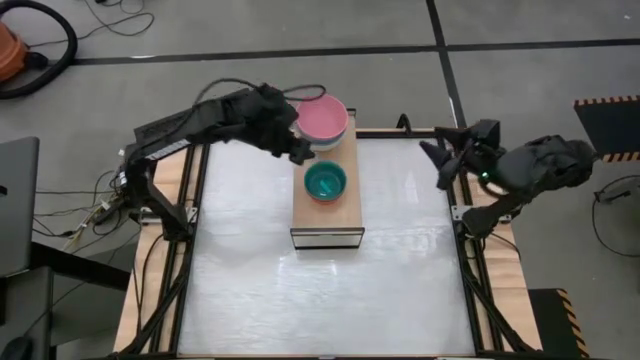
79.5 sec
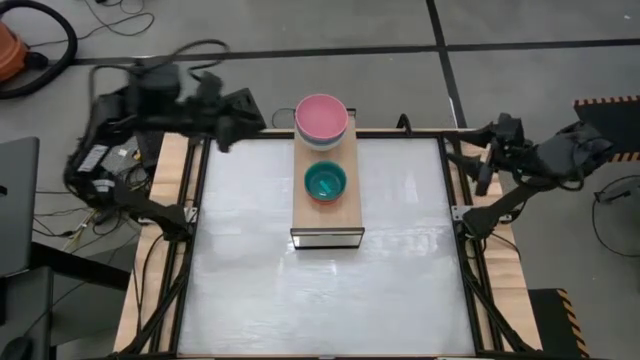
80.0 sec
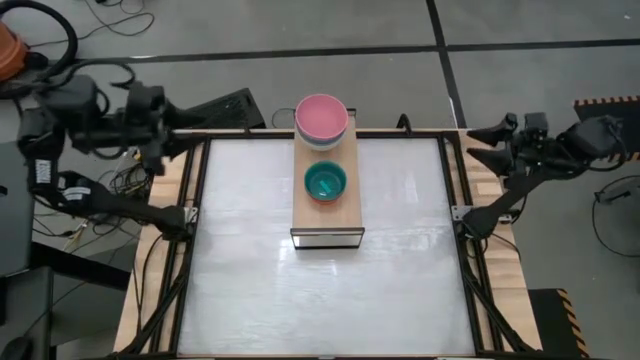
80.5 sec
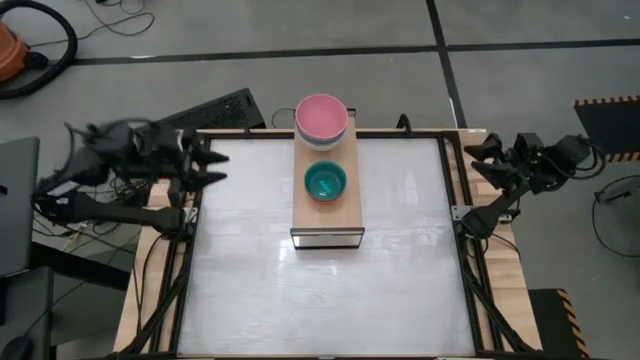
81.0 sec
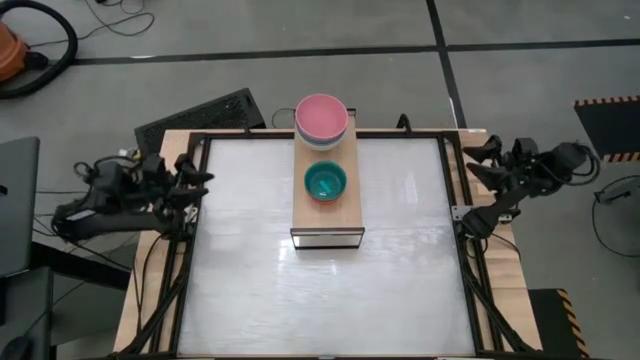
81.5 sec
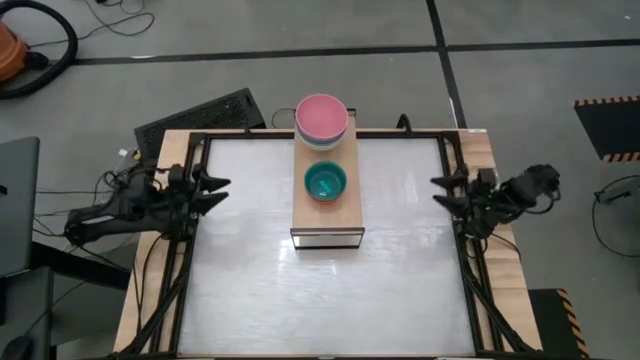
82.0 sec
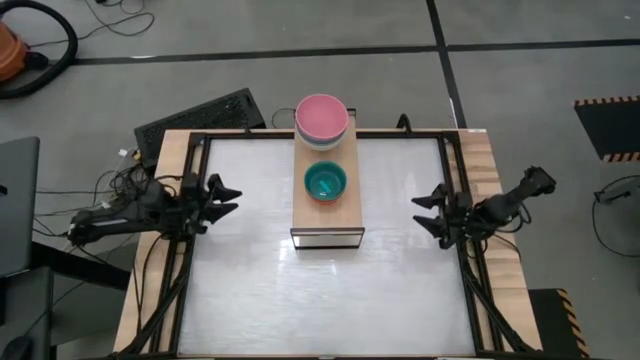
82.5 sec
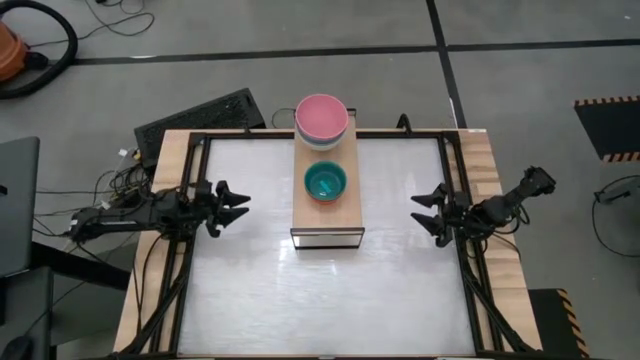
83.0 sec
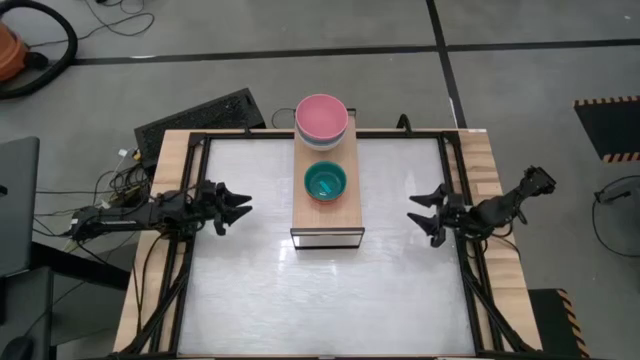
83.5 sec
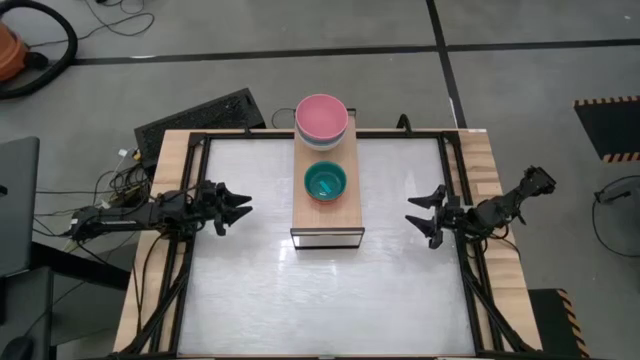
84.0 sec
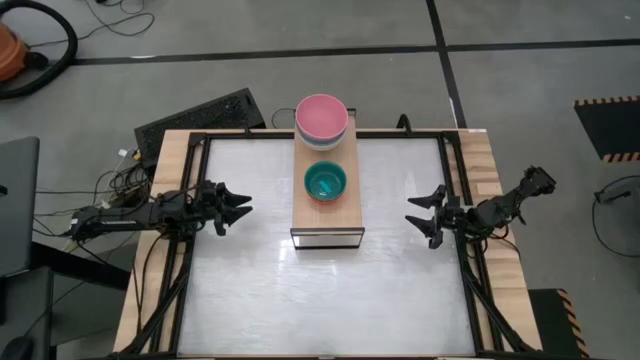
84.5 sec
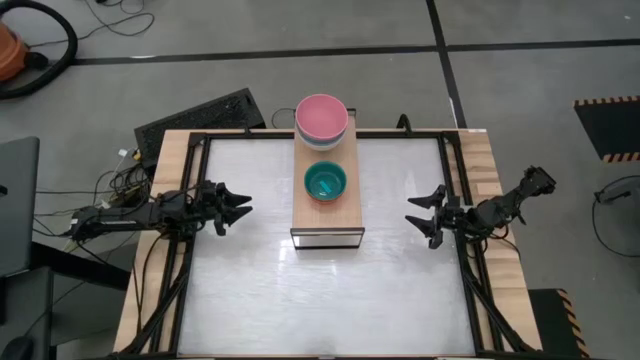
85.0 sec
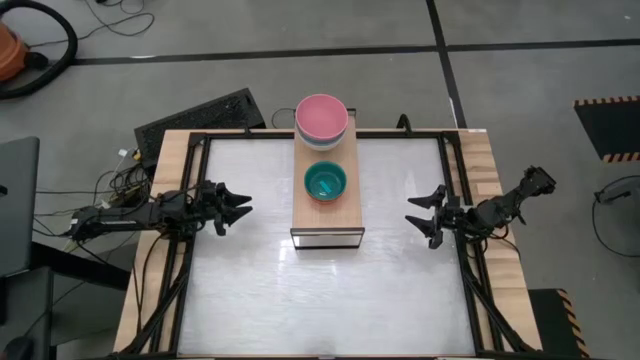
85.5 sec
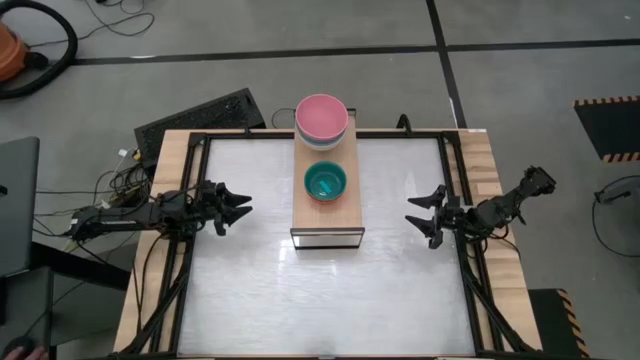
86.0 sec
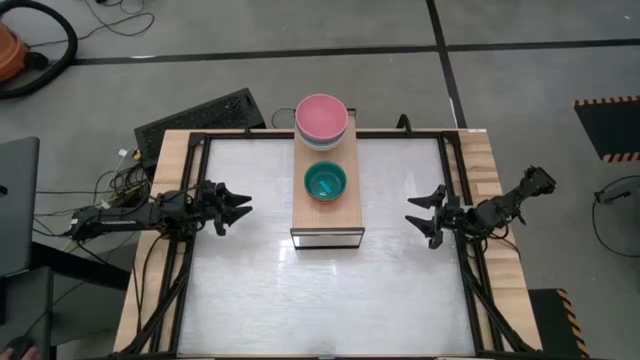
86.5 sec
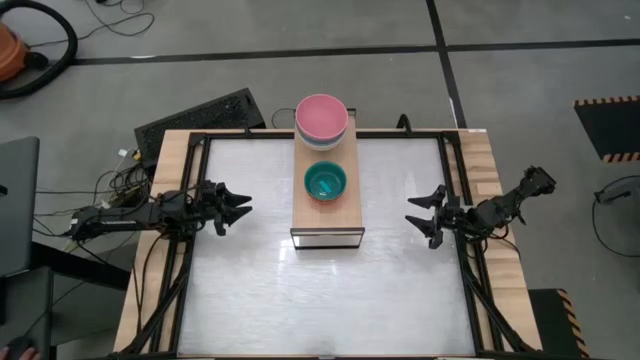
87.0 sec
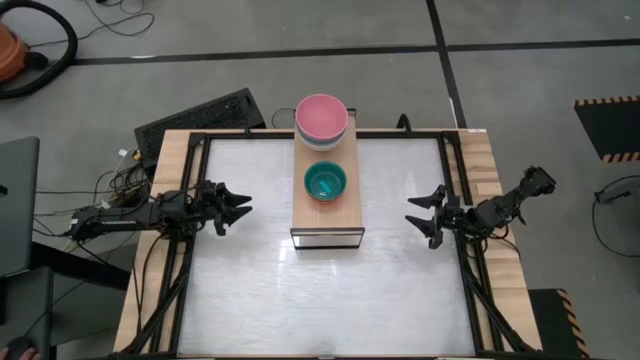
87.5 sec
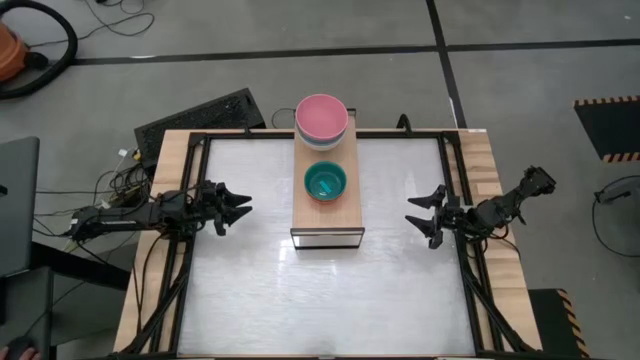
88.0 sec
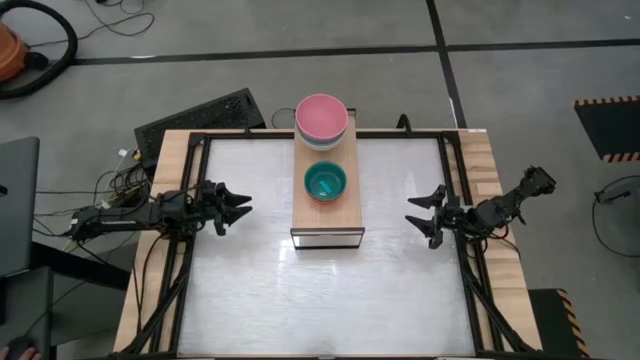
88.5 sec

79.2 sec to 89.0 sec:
Task: Place and stack bowls onto a shelf
Return to Home Position

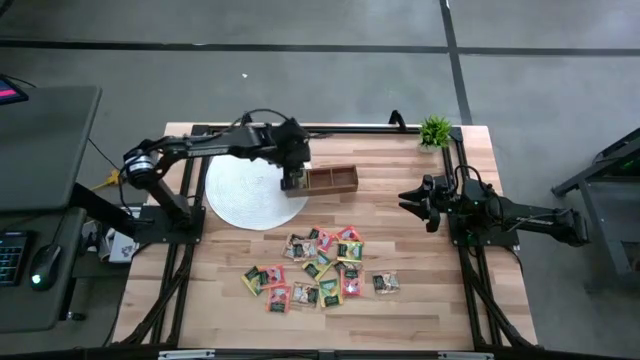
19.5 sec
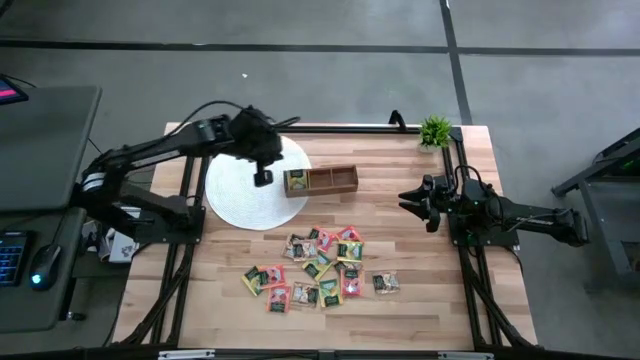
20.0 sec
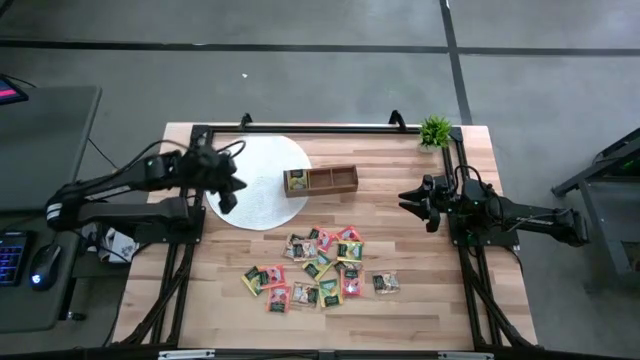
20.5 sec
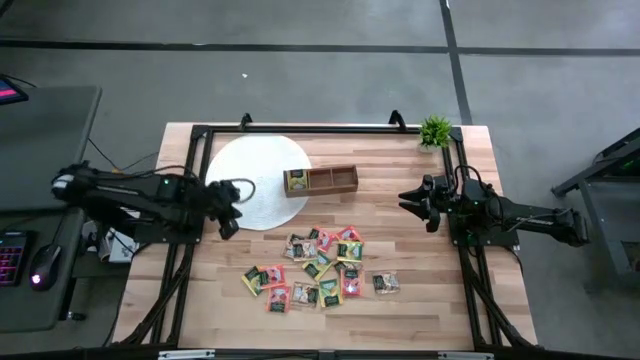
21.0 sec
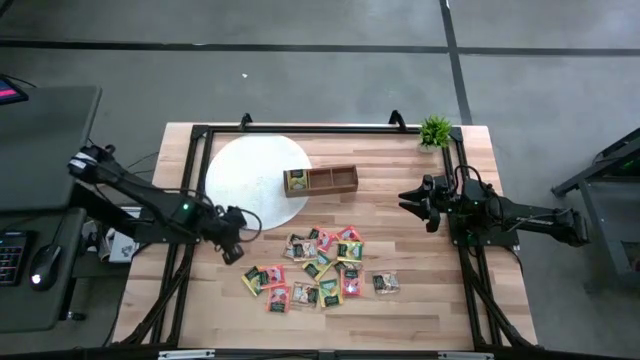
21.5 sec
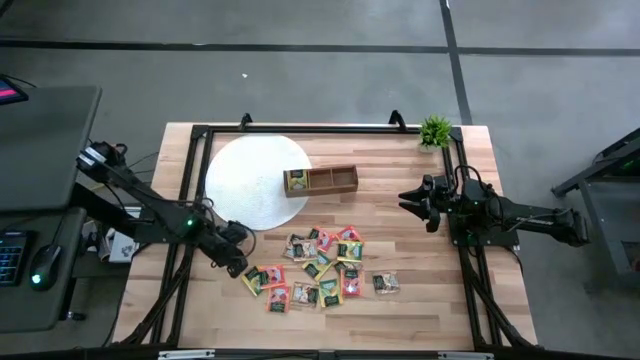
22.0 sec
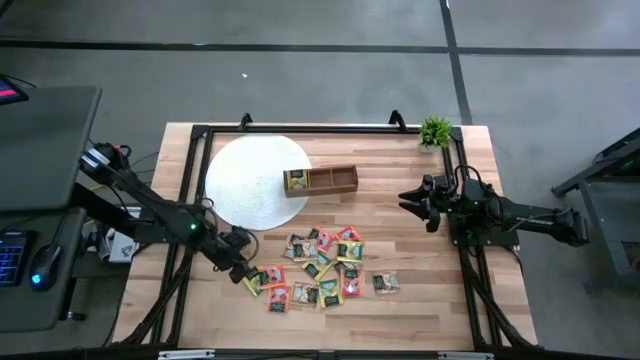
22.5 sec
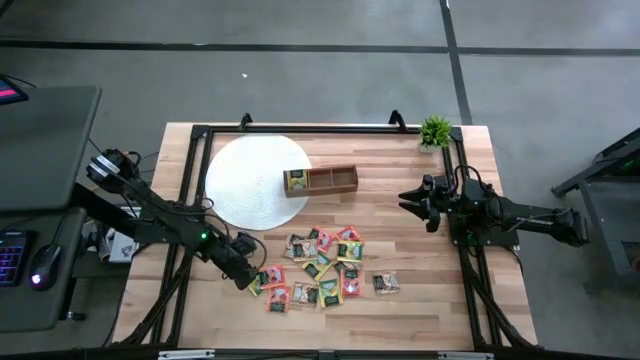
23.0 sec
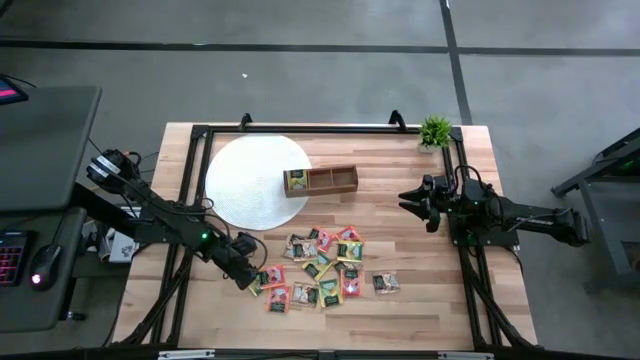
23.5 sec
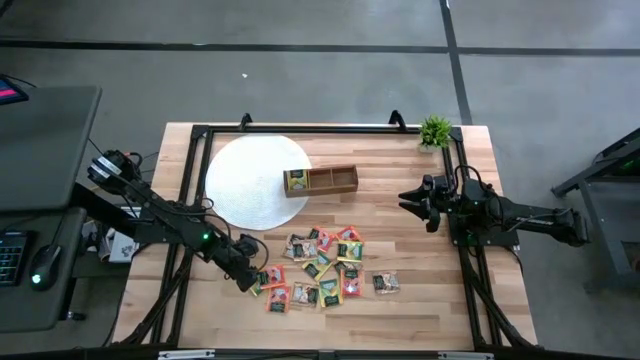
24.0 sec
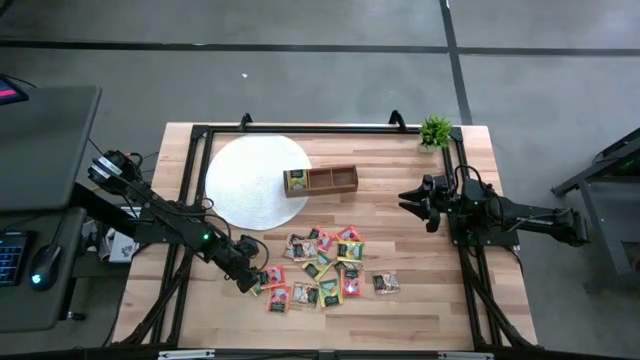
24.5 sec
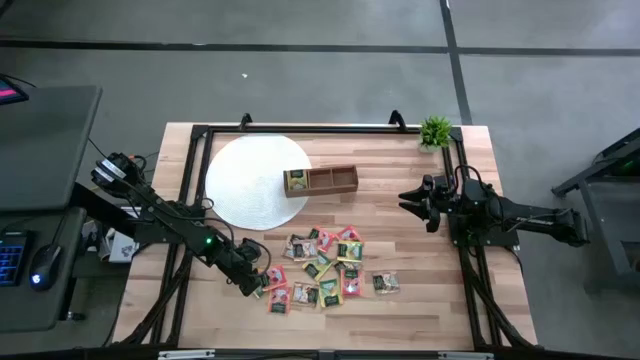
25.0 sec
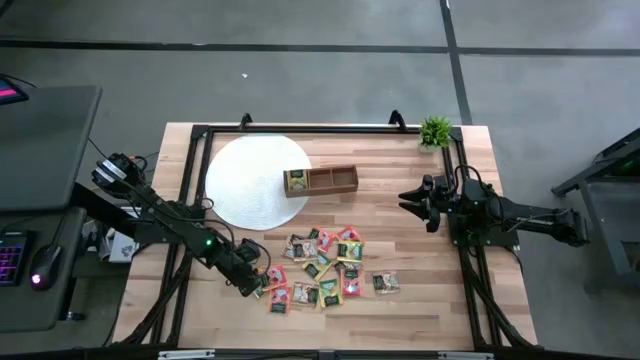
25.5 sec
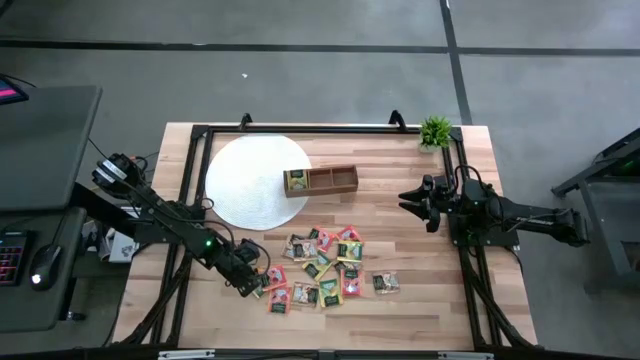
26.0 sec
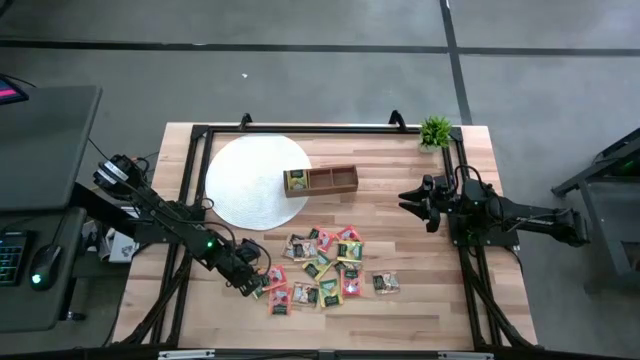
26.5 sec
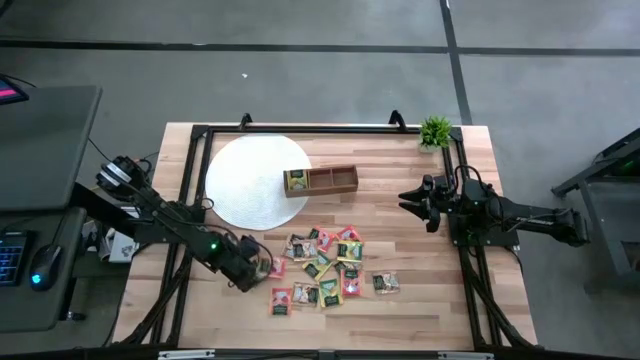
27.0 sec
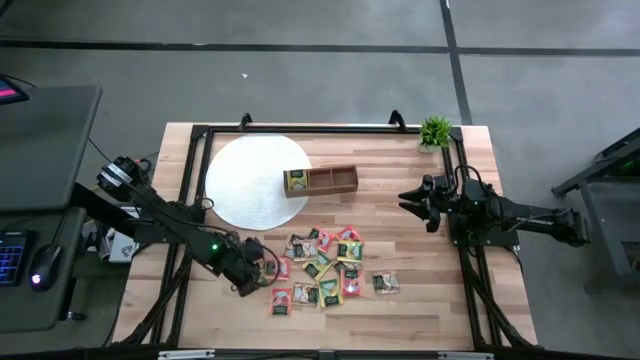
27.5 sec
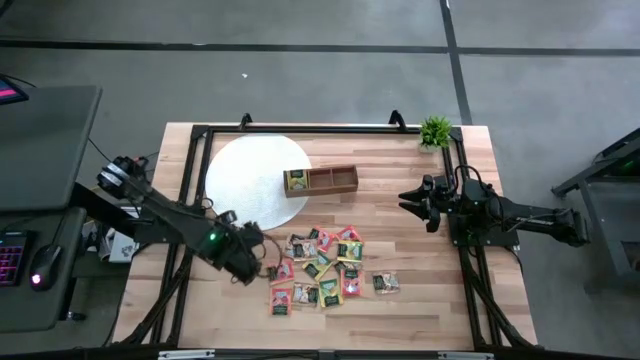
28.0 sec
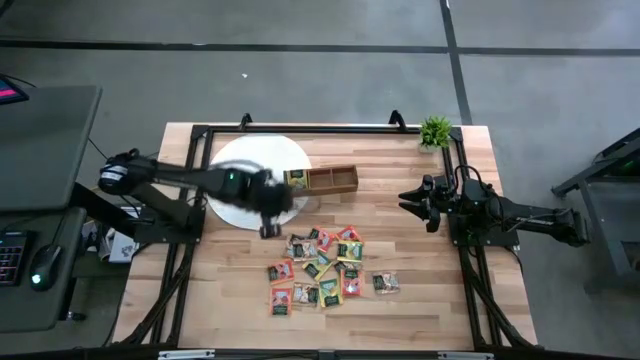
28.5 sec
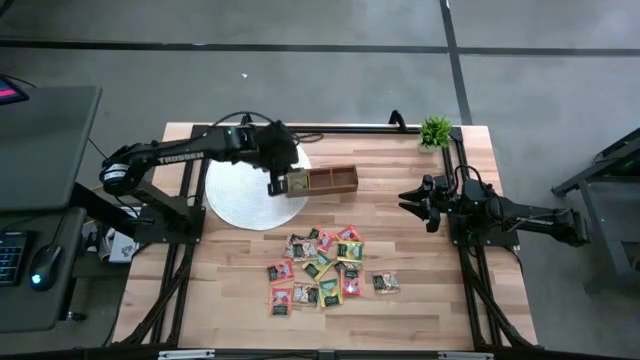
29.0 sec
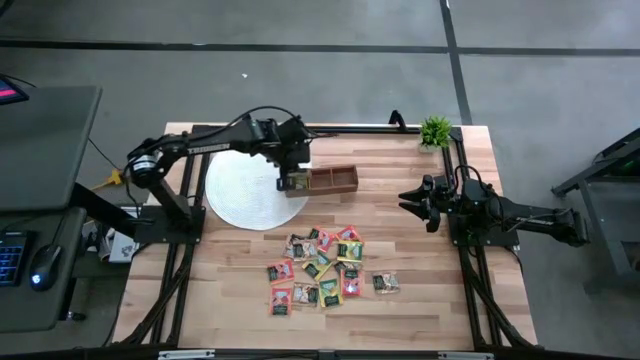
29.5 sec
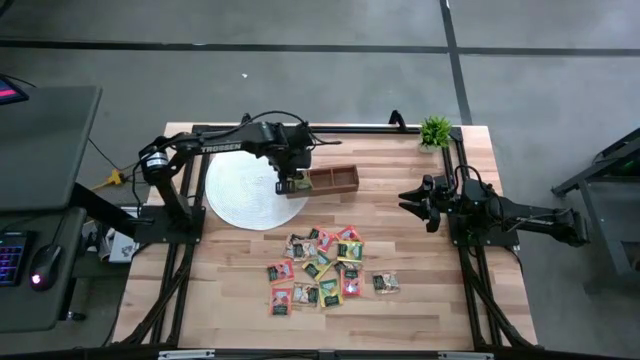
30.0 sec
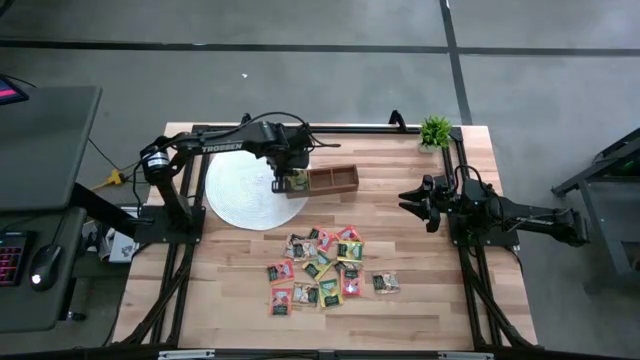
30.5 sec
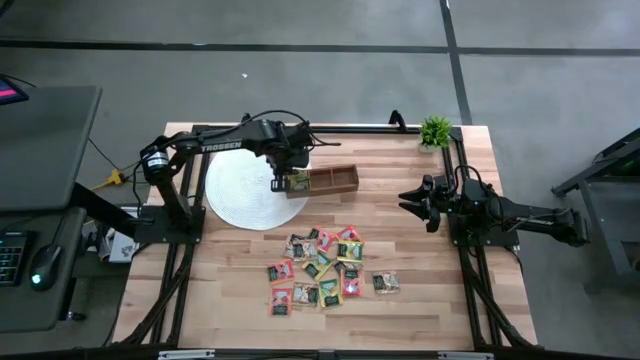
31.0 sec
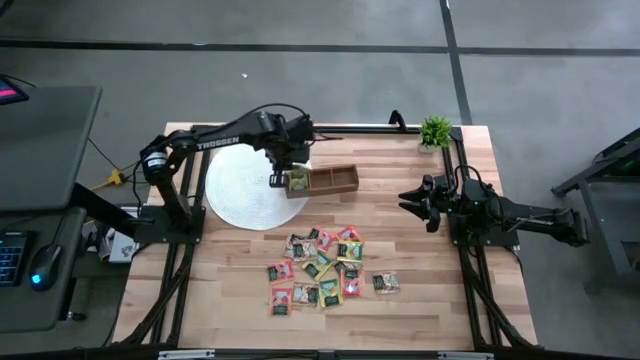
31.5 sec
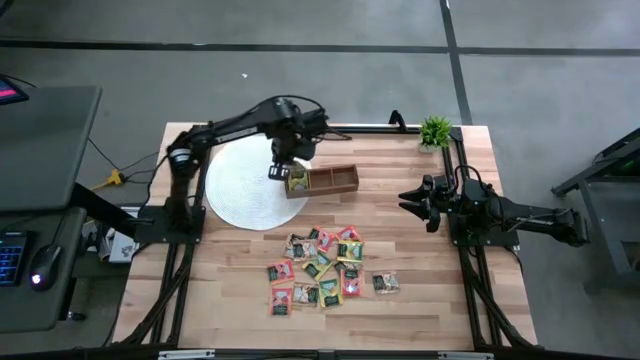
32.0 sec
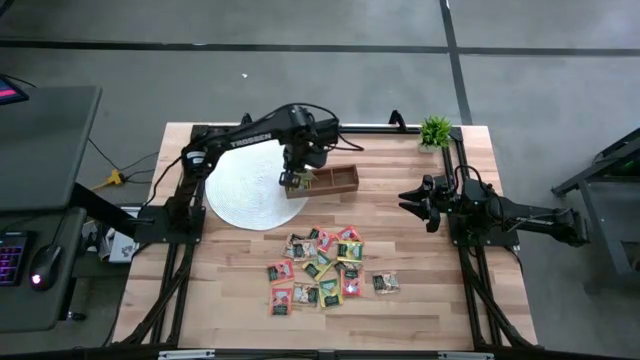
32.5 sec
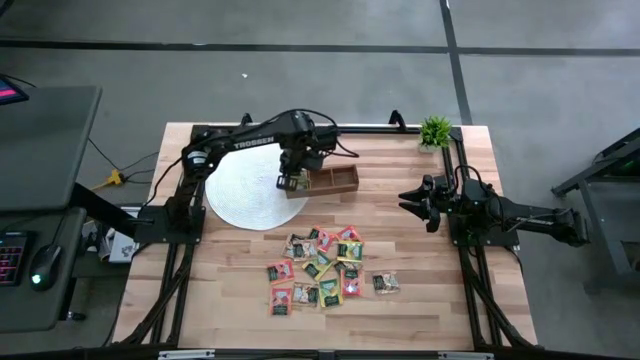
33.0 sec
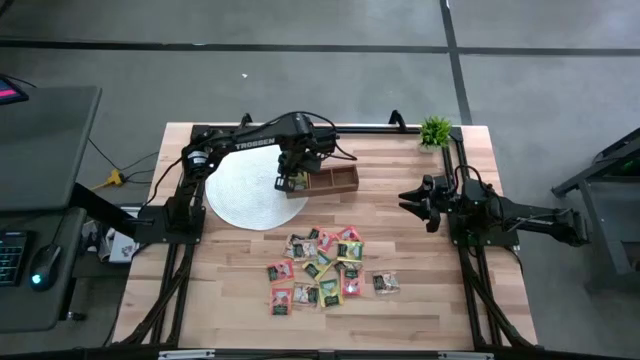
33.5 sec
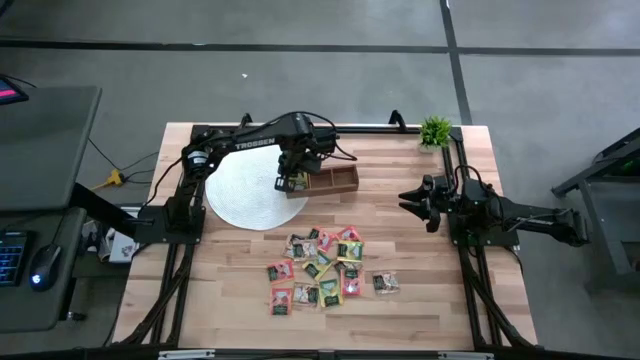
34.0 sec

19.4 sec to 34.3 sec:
Task: Pick & Place Tea
Put the yellow tea bag into the left compartment of the wooden organizer
